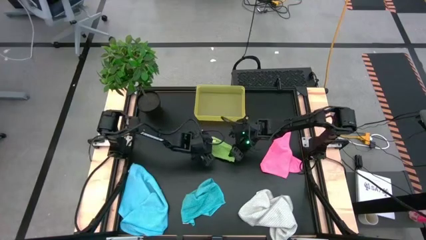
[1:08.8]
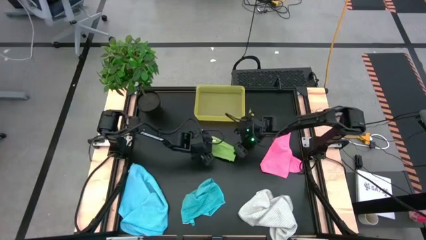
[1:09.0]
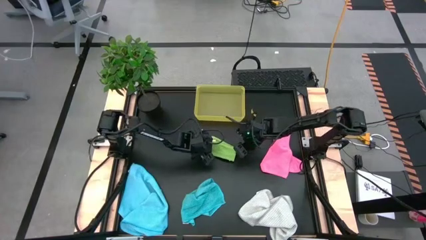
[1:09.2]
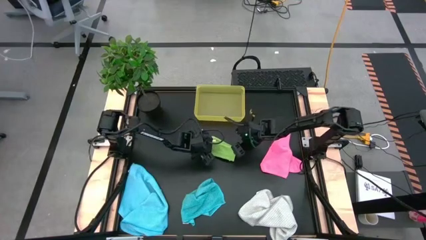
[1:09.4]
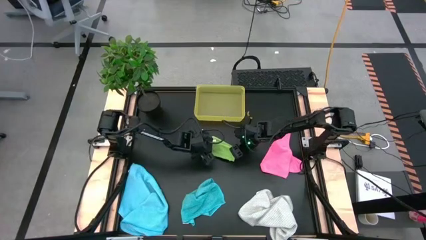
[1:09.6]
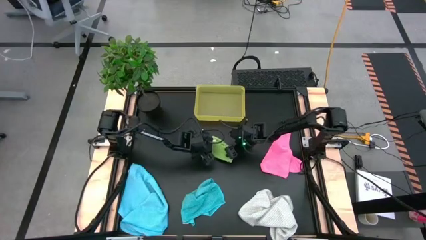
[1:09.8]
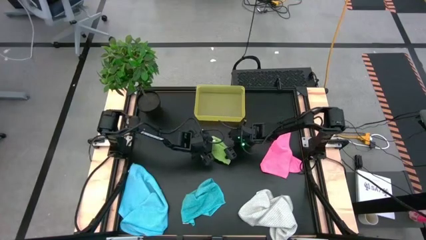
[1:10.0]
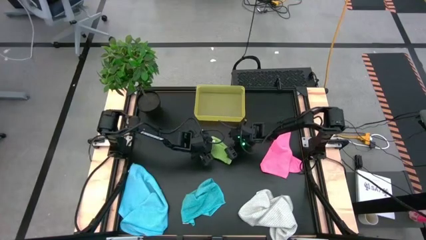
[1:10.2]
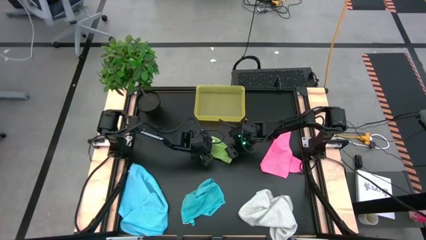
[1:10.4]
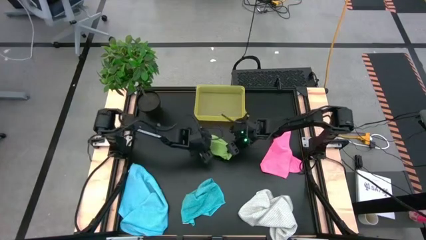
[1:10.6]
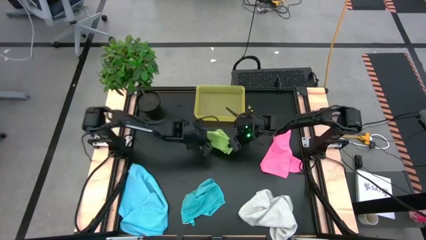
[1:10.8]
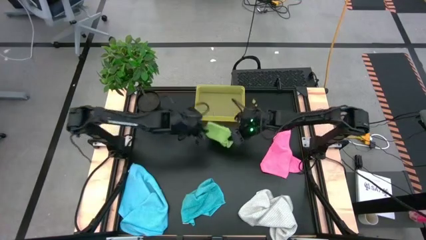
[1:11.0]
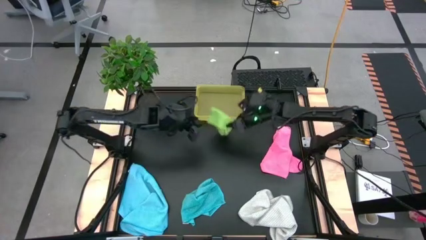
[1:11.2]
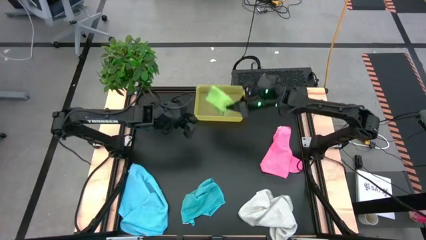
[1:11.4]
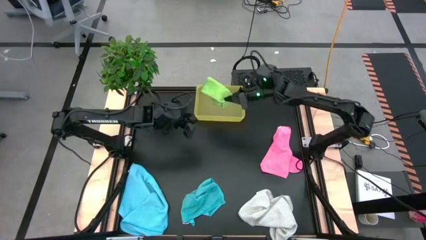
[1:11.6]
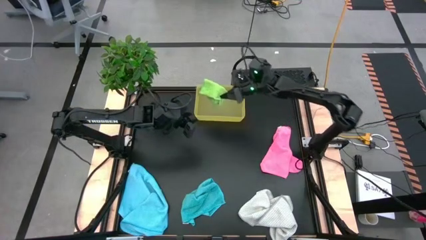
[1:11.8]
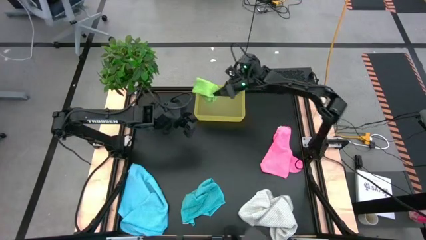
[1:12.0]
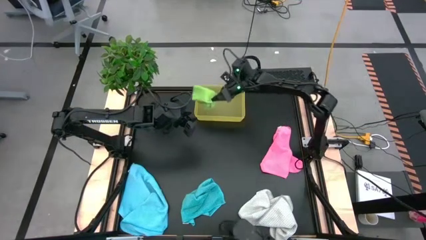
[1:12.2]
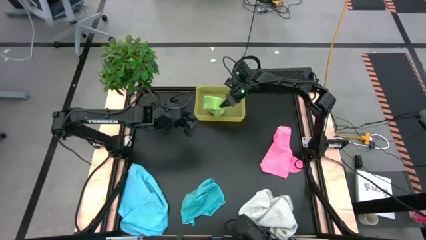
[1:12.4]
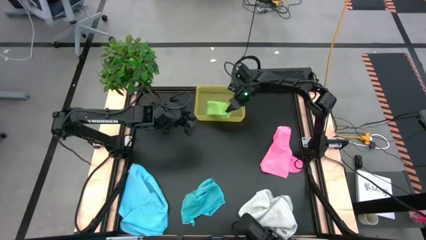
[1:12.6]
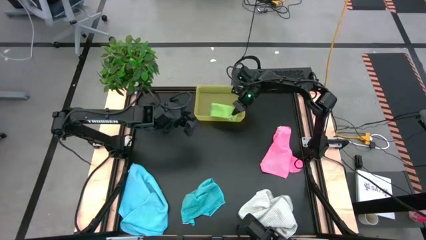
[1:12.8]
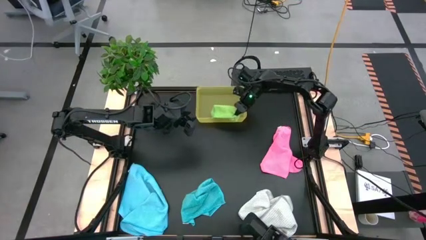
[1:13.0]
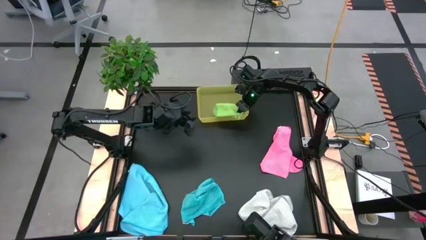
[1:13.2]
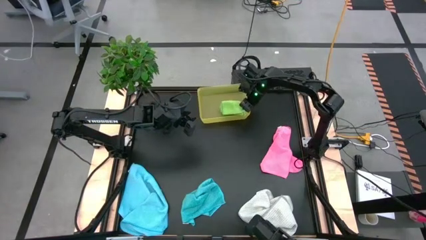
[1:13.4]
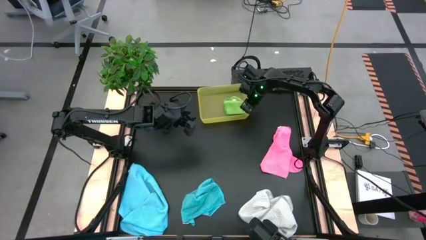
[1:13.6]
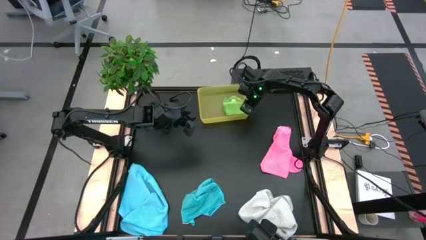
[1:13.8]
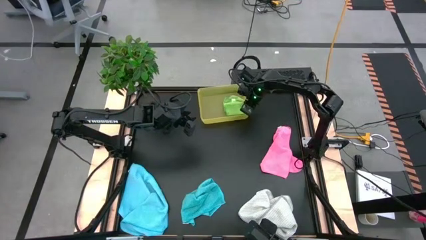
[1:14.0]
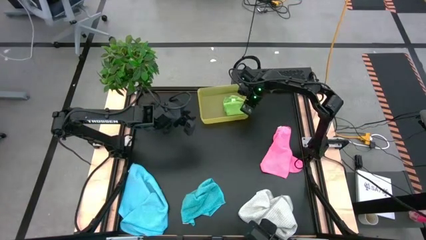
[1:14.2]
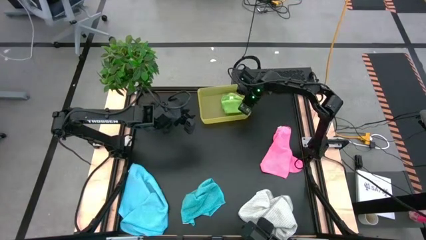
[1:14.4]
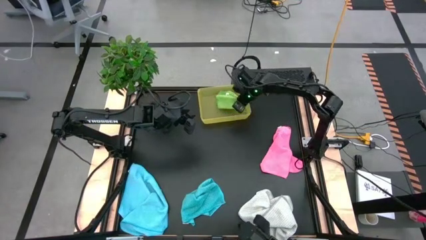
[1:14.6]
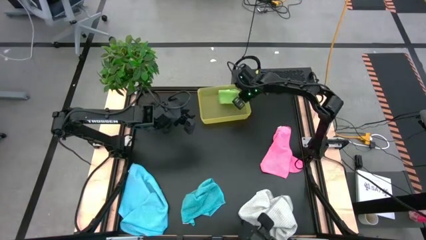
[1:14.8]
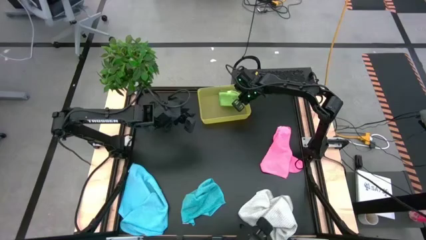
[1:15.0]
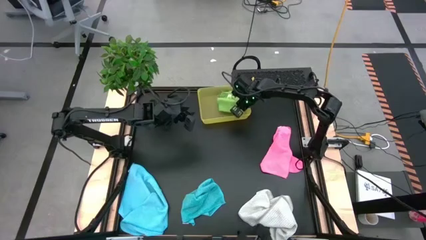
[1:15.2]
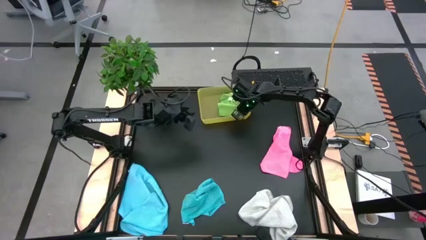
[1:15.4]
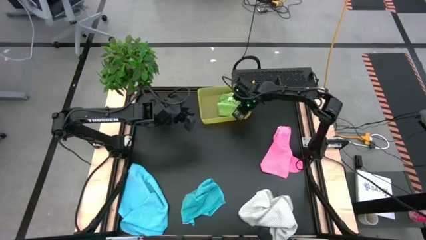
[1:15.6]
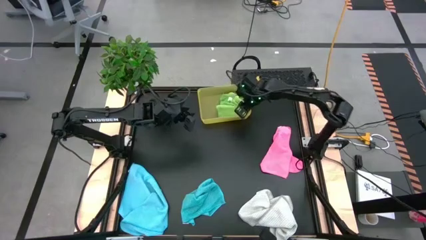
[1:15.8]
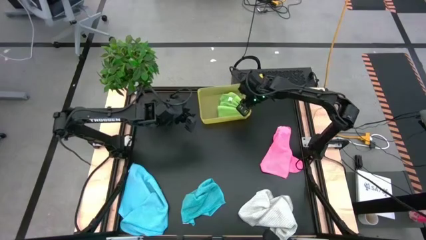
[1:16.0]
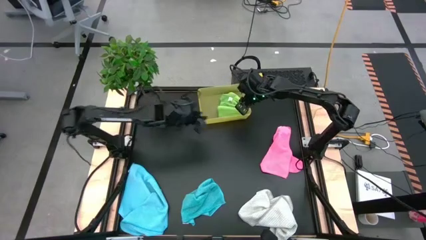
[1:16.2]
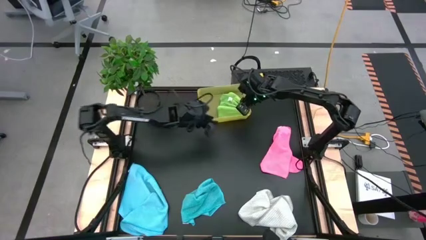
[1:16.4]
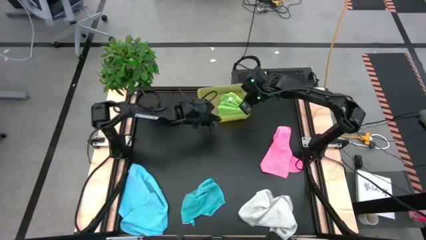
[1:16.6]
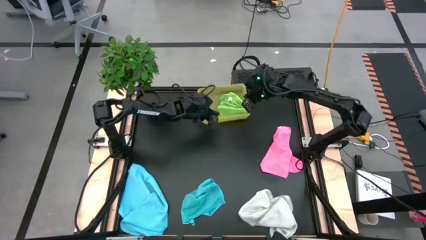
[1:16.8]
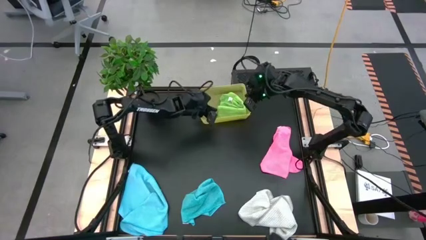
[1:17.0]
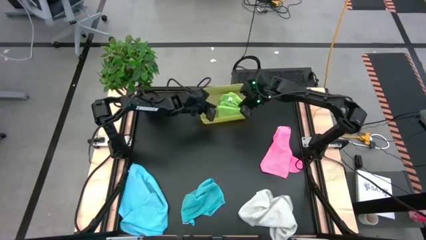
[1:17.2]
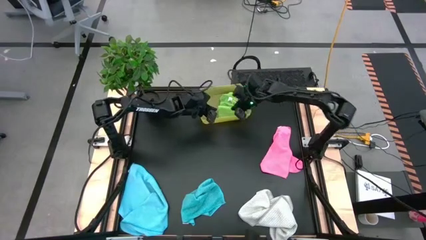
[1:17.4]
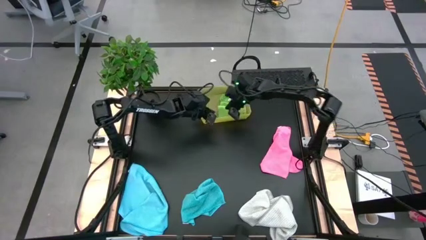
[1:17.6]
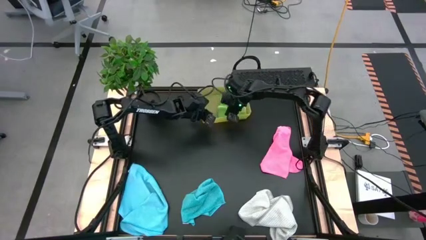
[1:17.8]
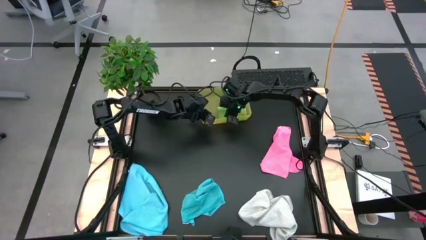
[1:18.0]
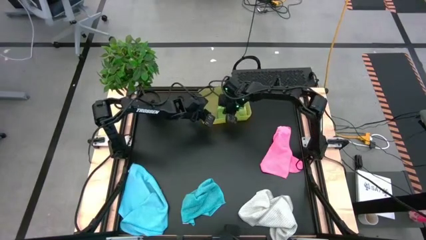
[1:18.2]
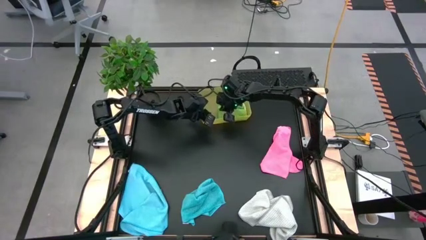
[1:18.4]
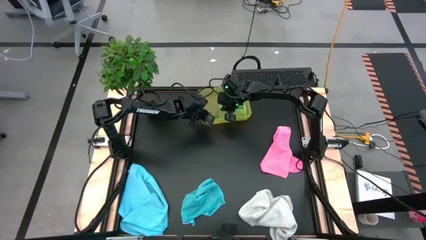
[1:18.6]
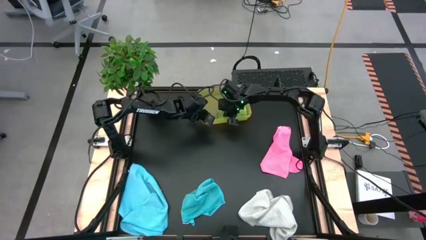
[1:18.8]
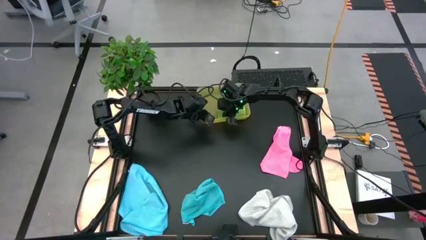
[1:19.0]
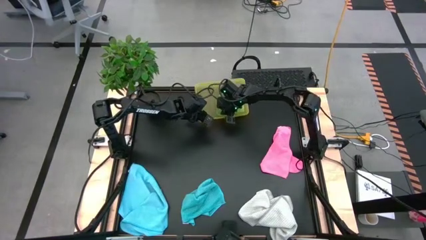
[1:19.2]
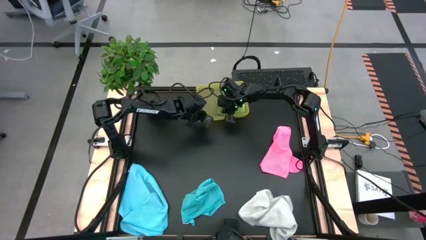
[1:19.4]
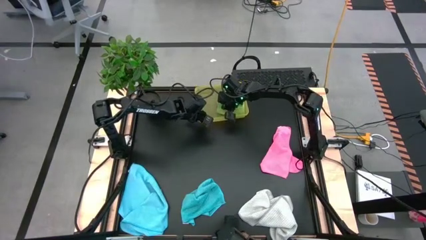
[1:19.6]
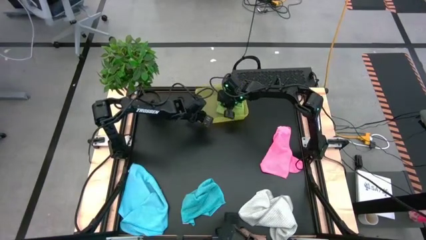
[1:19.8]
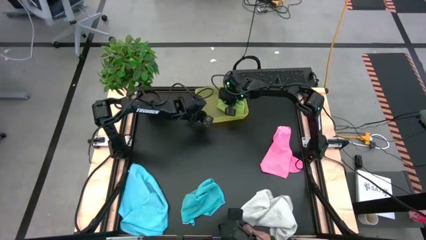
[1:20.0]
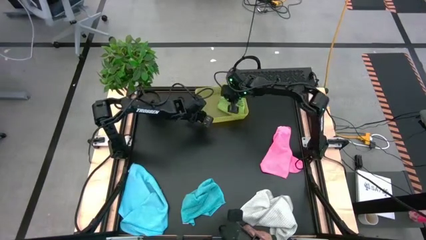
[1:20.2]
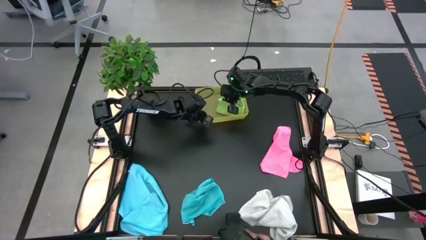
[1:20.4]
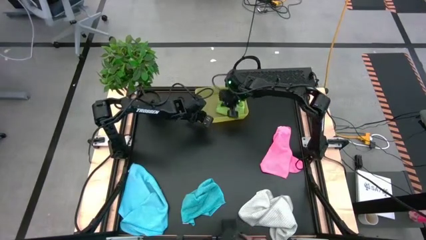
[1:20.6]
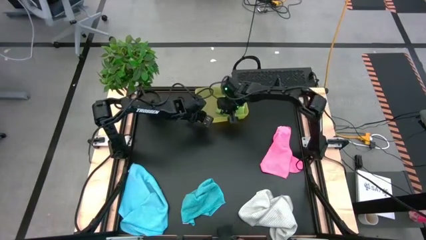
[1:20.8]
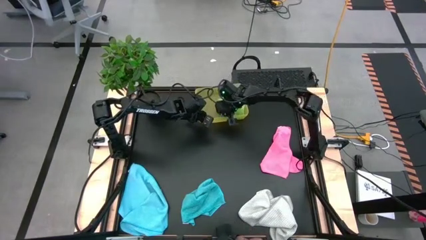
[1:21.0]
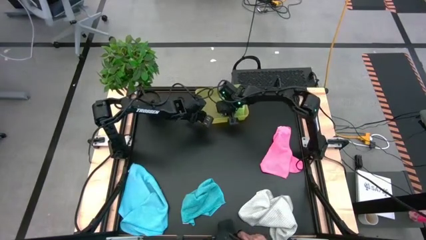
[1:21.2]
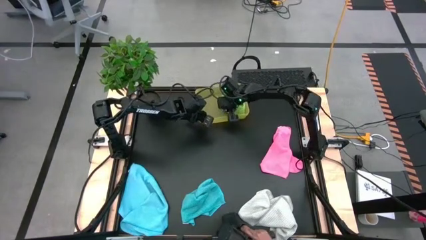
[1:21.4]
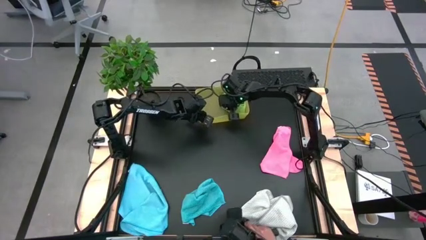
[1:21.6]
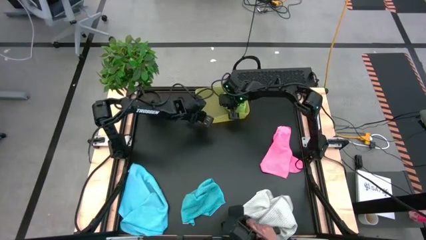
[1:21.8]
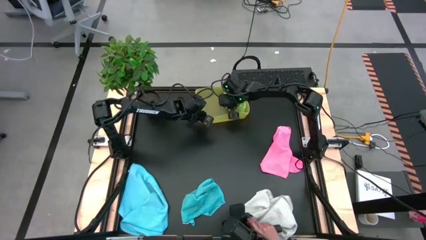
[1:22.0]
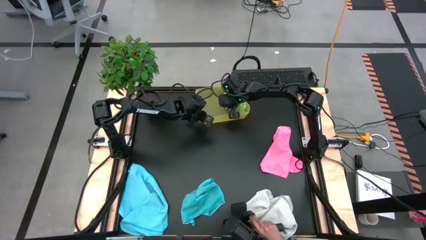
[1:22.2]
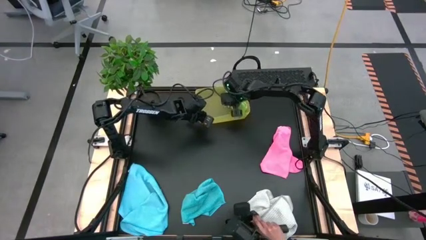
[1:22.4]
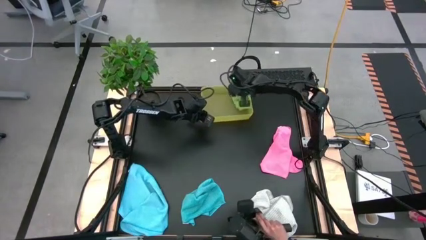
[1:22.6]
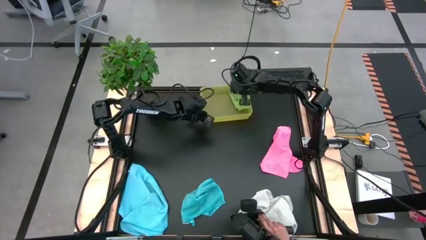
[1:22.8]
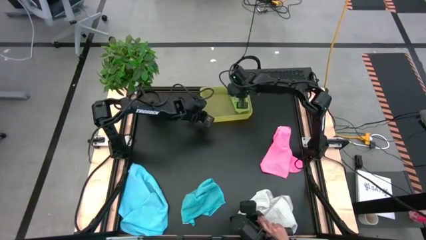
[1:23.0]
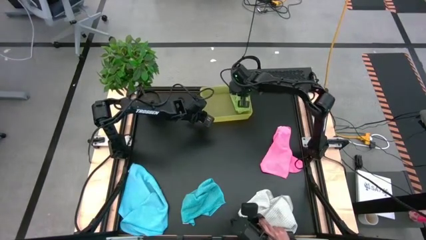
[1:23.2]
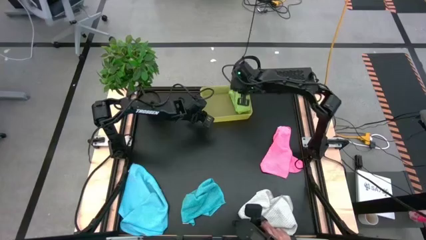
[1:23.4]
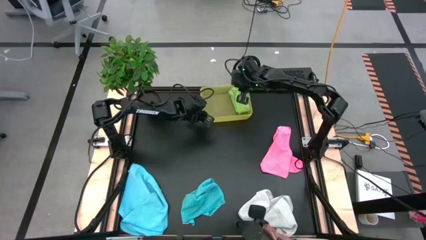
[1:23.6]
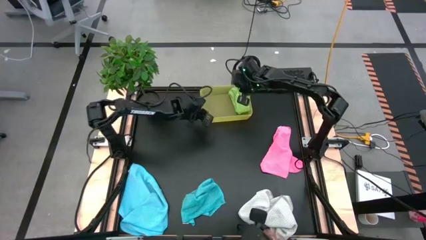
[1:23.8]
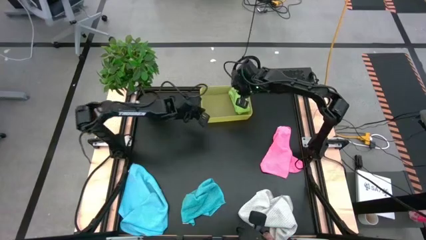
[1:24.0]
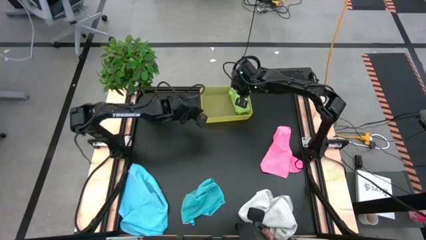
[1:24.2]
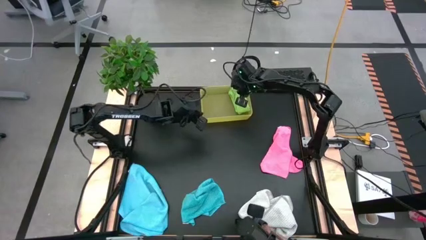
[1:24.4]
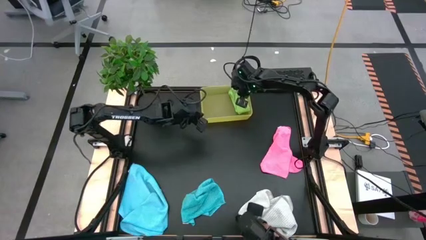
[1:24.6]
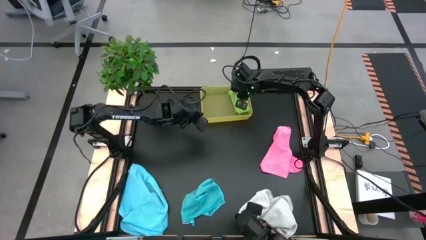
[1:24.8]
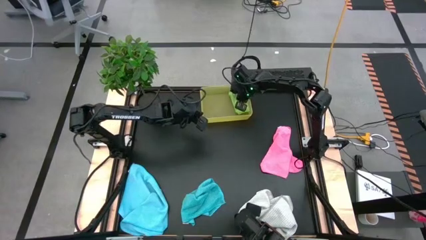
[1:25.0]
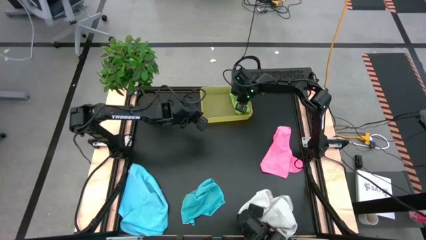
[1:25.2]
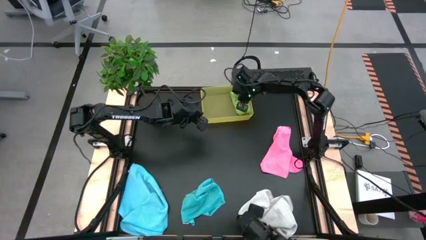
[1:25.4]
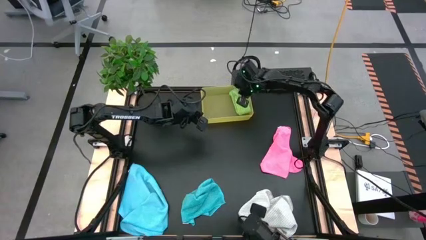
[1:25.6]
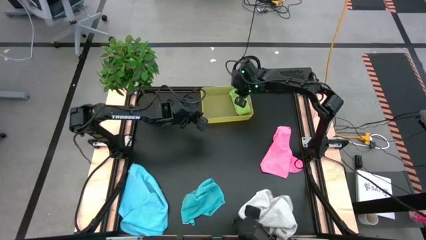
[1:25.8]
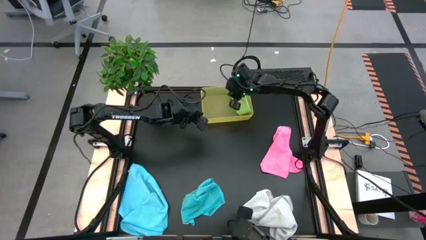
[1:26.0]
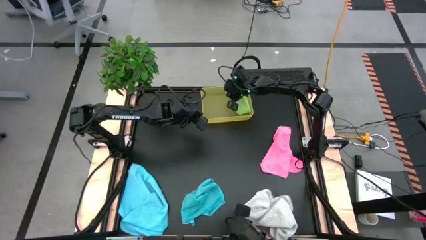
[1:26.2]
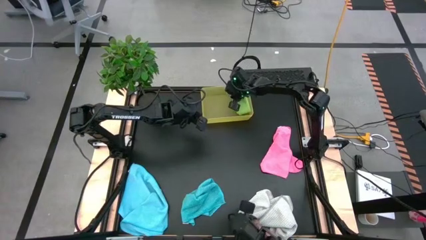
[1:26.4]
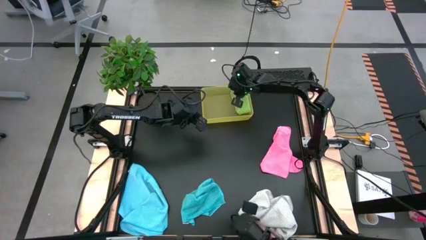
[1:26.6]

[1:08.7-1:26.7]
Task: Fold microfiber towels
Put the green microfiber cloth into the bin
